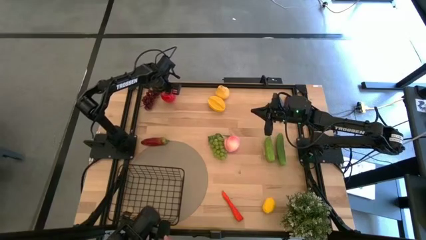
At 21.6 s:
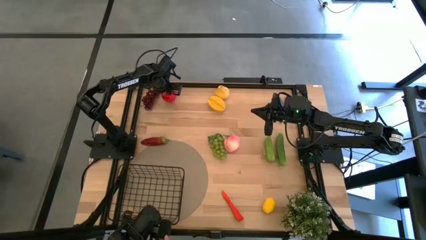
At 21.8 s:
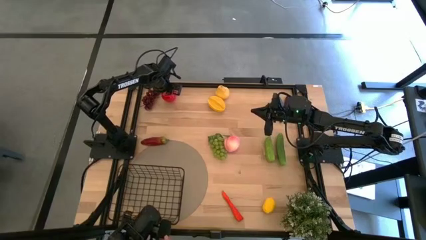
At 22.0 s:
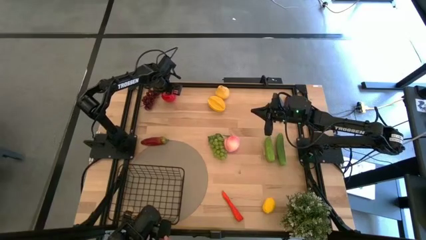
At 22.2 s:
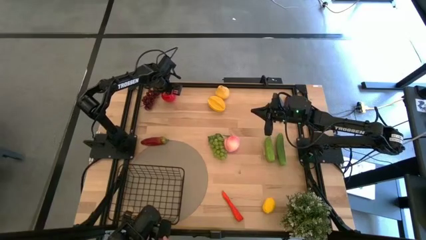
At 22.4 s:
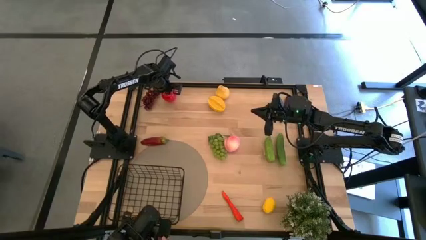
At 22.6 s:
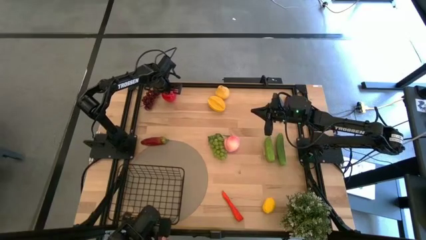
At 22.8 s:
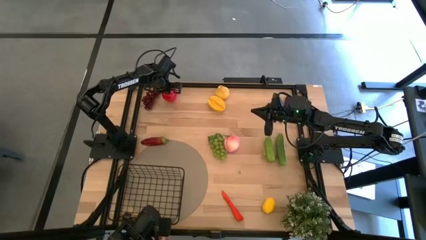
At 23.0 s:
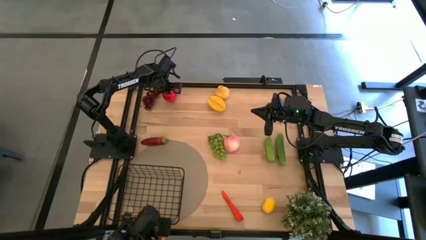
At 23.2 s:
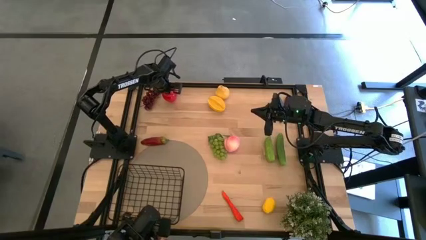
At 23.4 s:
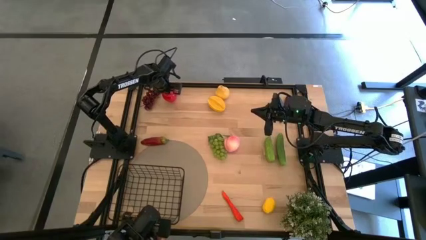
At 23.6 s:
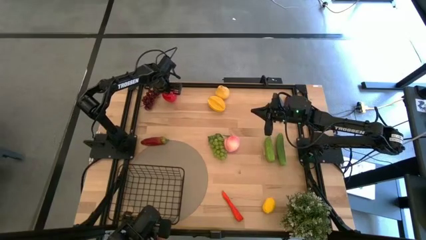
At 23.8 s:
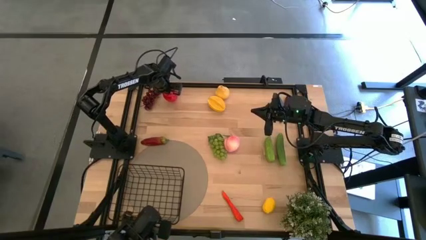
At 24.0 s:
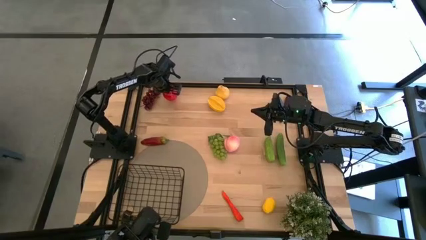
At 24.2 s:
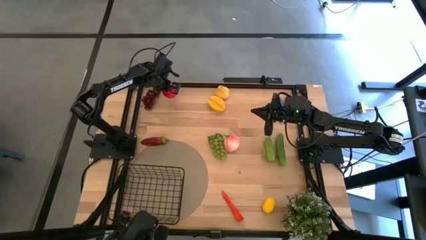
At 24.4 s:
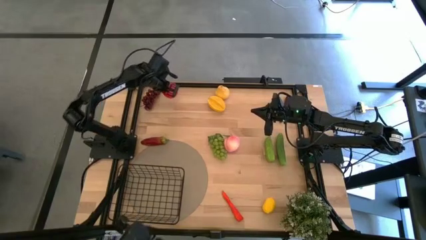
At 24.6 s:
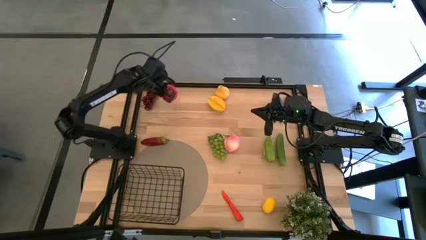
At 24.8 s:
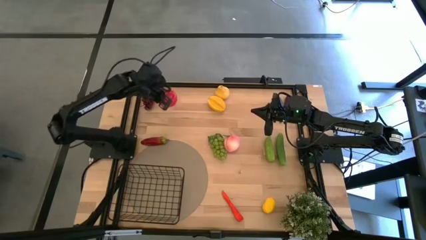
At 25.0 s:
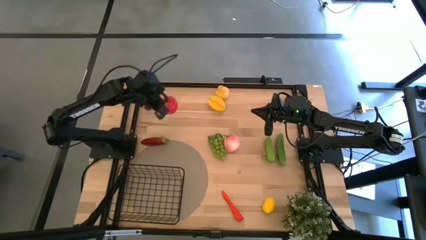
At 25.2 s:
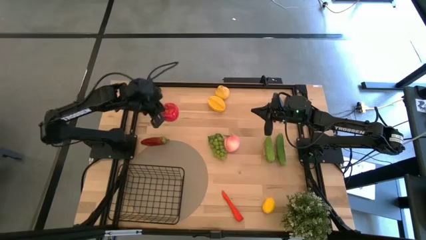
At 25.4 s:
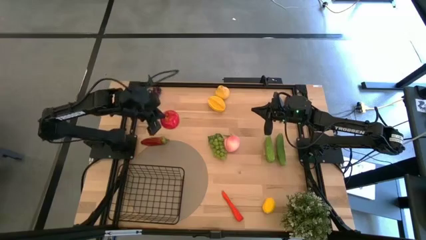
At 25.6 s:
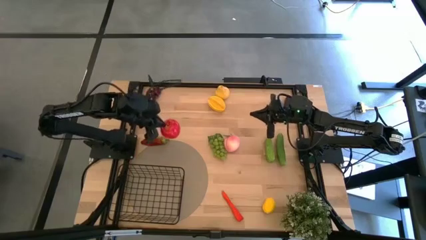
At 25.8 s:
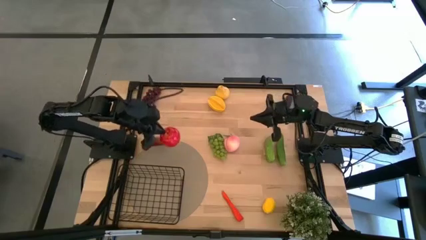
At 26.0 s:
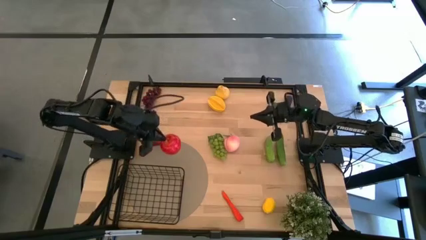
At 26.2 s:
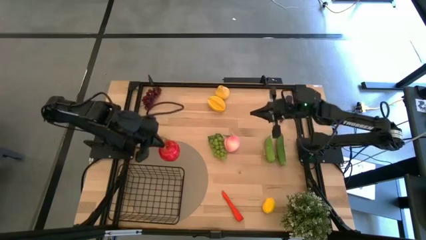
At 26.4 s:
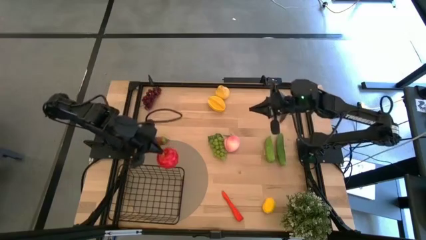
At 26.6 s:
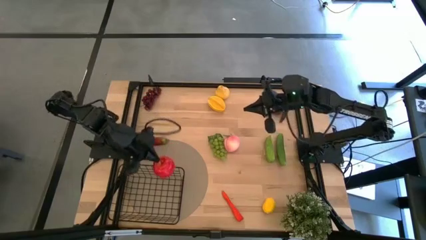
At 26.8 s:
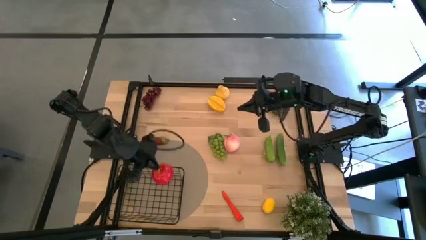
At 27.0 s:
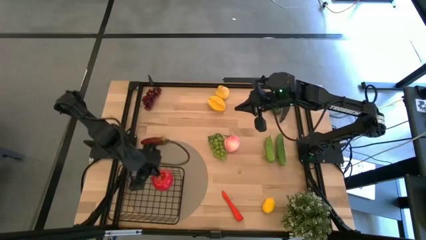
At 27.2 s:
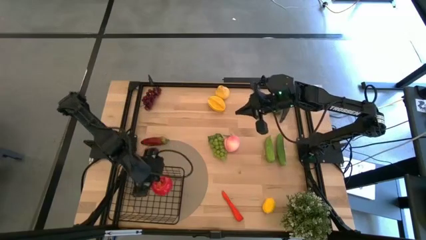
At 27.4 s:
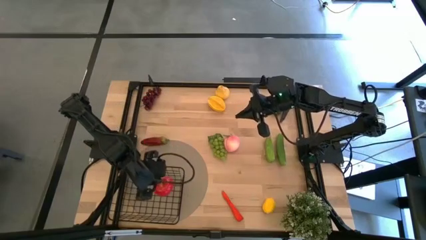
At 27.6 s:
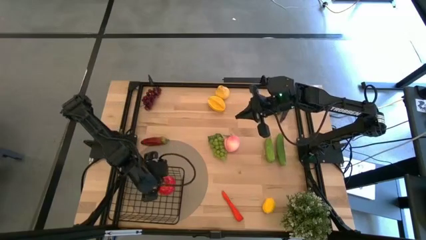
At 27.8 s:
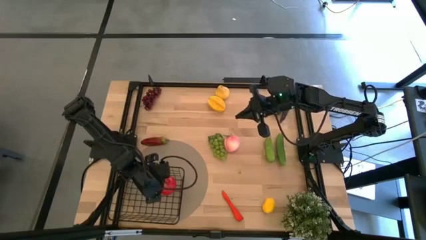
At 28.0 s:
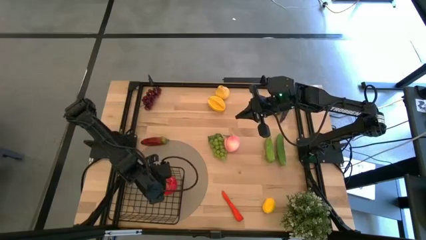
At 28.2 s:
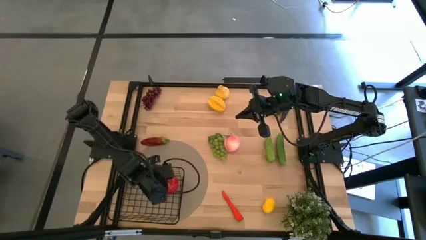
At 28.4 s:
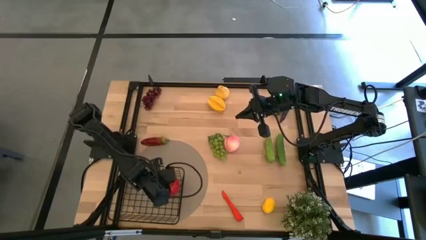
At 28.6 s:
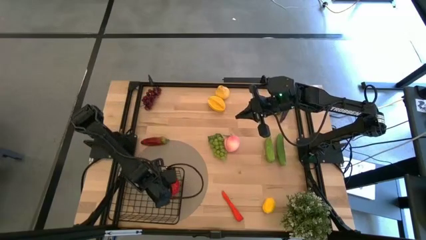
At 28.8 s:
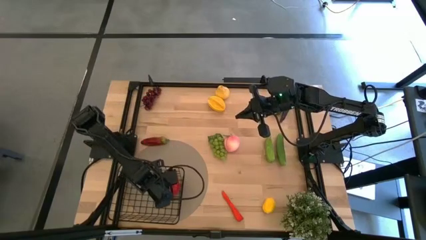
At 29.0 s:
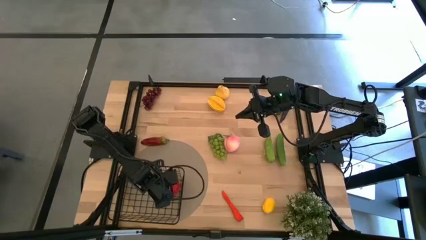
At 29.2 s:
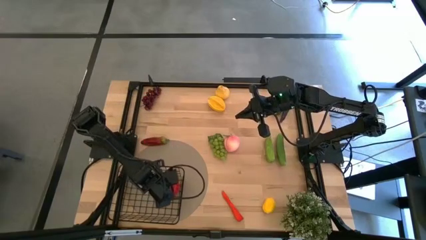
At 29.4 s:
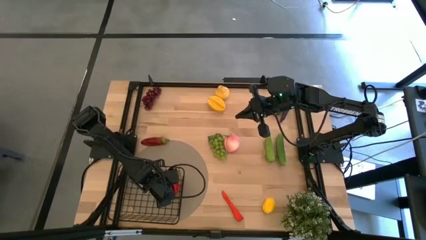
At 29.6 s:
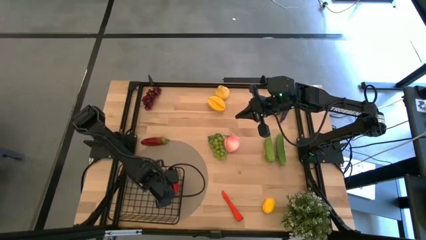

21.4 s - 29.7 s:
Task: Build produce basket
Put the red apple into the wire basket
